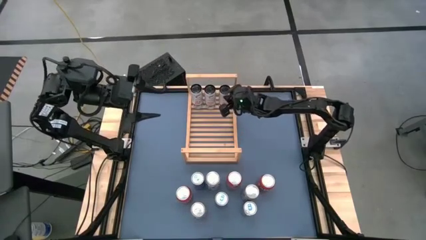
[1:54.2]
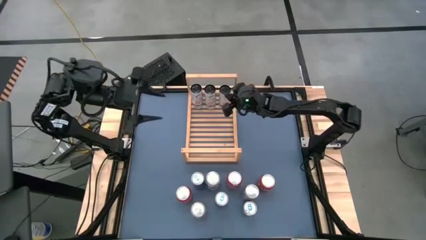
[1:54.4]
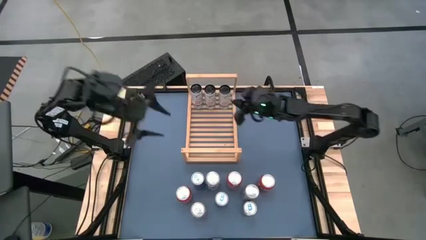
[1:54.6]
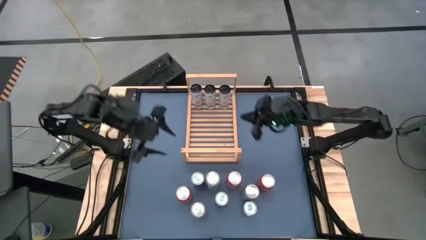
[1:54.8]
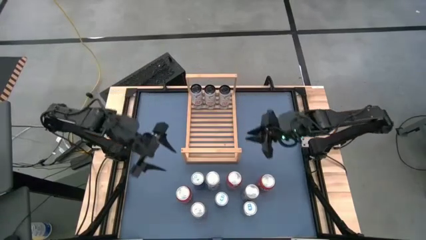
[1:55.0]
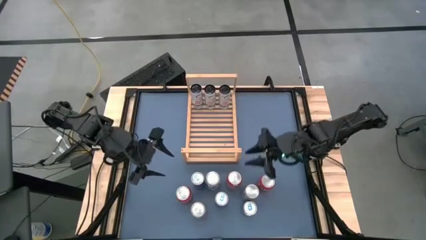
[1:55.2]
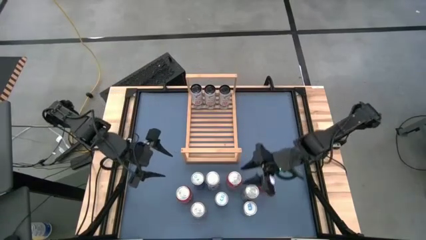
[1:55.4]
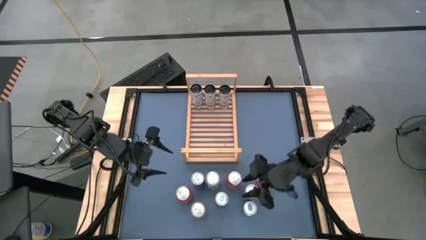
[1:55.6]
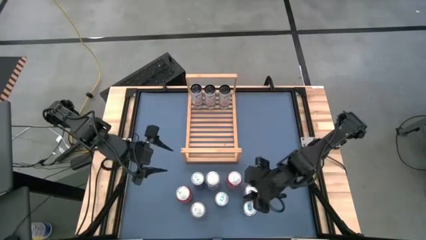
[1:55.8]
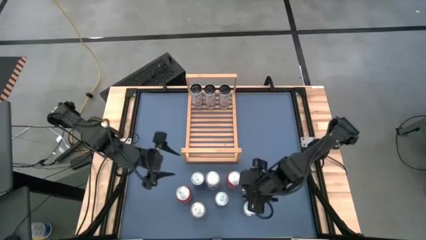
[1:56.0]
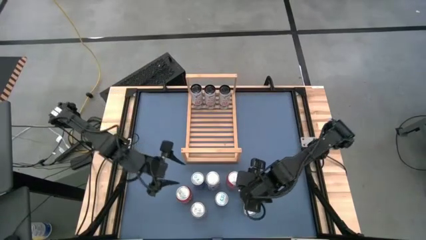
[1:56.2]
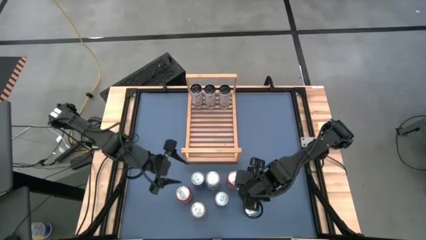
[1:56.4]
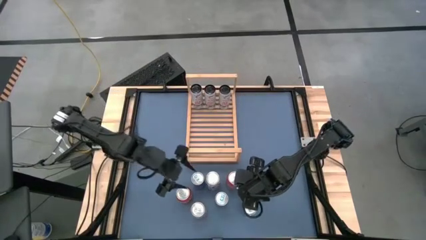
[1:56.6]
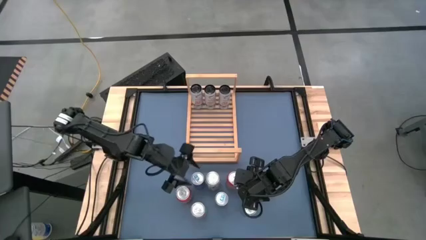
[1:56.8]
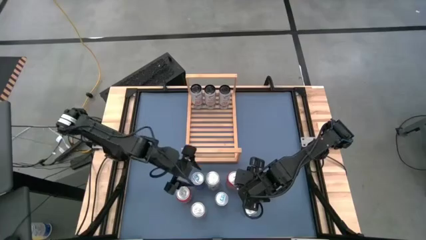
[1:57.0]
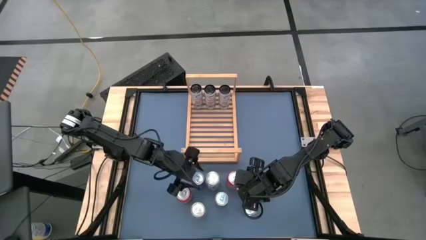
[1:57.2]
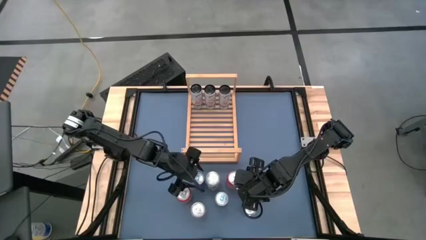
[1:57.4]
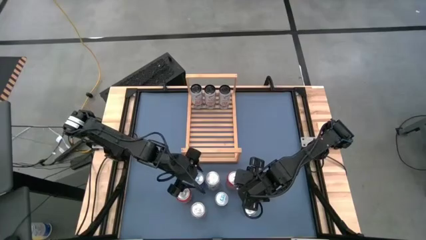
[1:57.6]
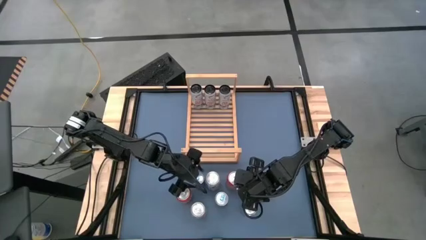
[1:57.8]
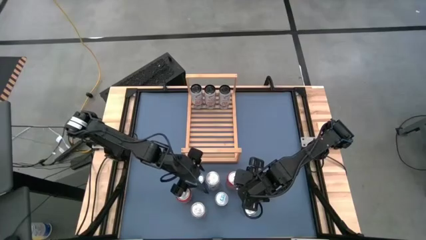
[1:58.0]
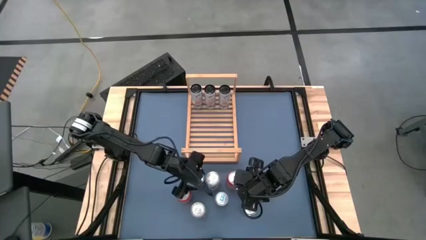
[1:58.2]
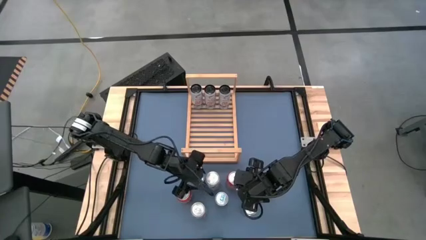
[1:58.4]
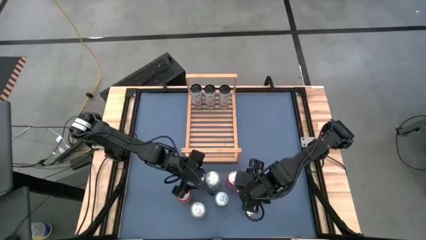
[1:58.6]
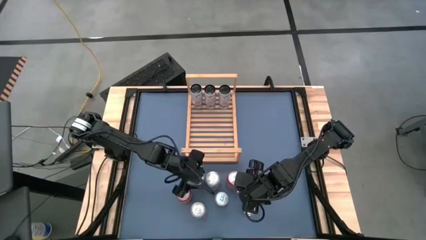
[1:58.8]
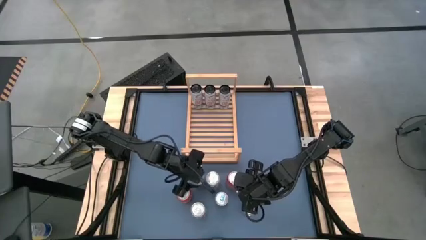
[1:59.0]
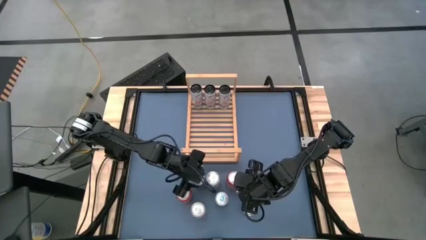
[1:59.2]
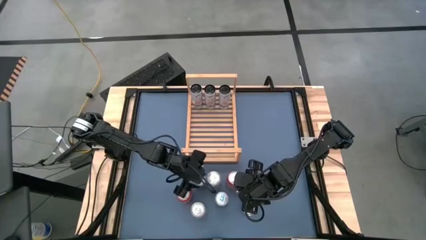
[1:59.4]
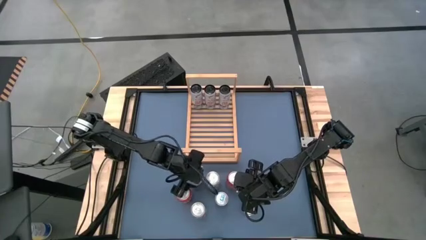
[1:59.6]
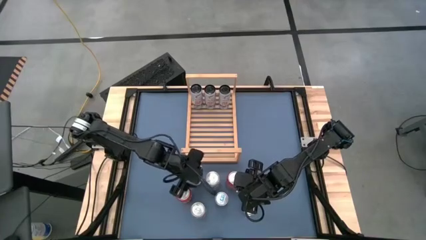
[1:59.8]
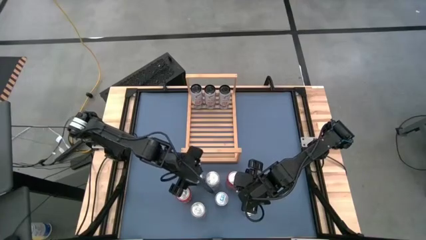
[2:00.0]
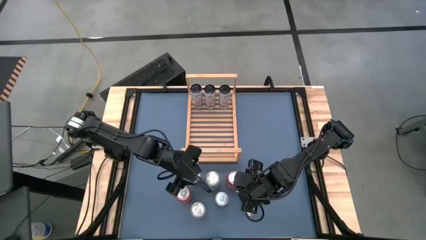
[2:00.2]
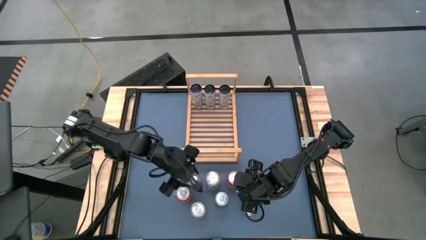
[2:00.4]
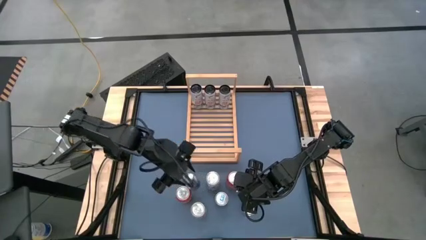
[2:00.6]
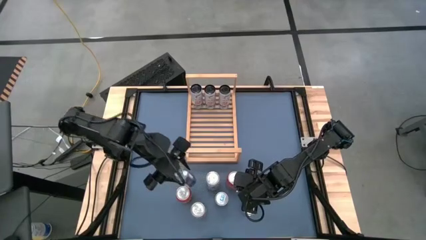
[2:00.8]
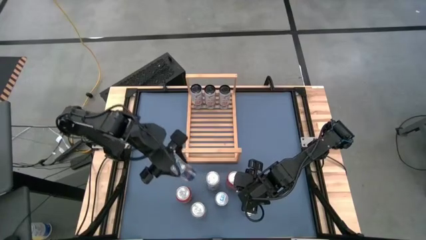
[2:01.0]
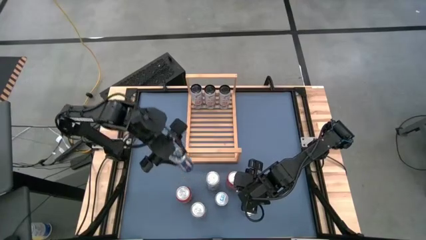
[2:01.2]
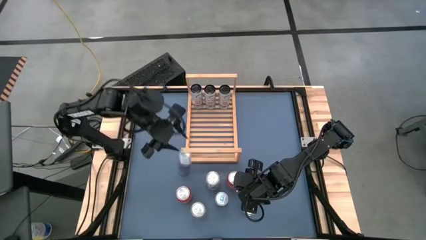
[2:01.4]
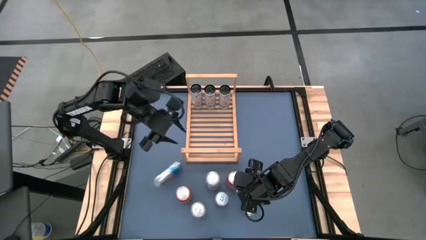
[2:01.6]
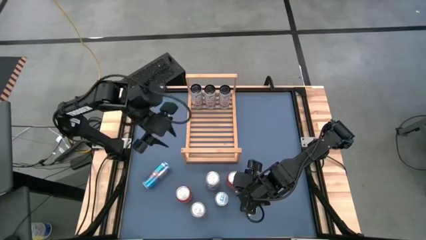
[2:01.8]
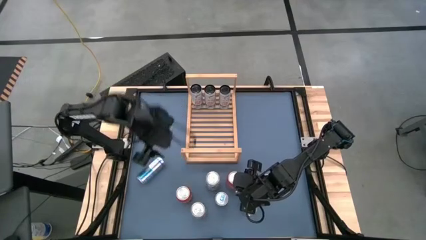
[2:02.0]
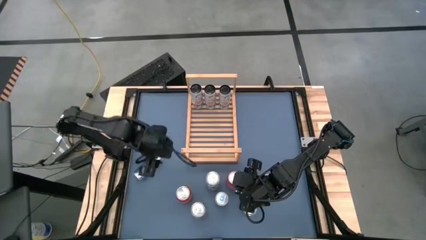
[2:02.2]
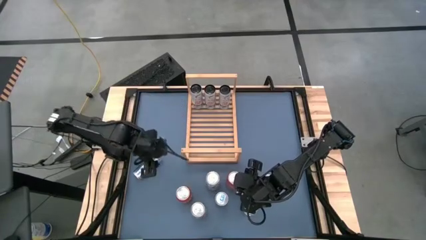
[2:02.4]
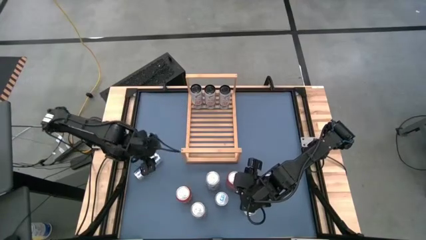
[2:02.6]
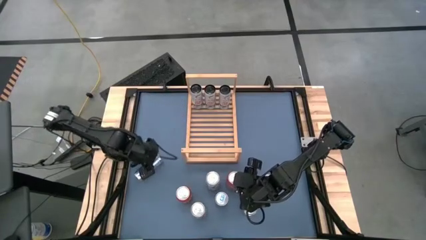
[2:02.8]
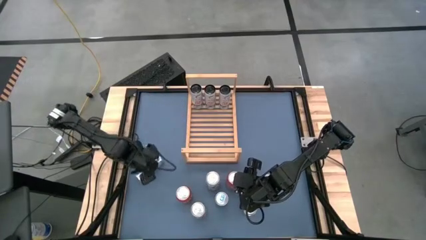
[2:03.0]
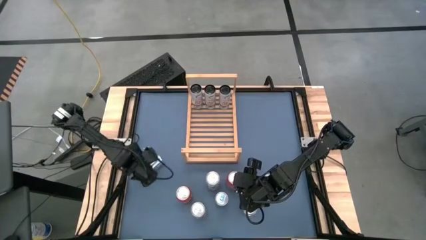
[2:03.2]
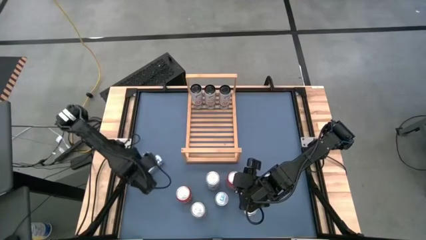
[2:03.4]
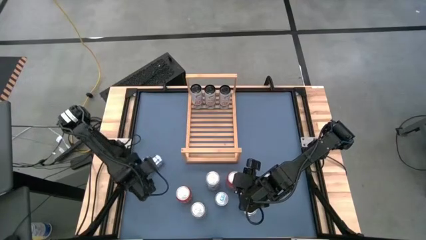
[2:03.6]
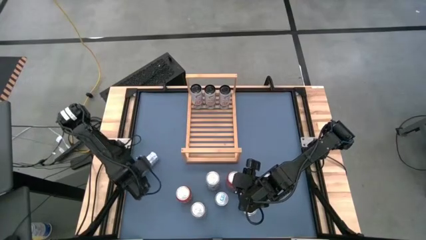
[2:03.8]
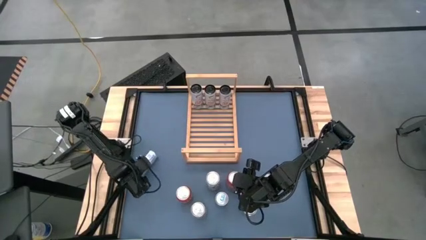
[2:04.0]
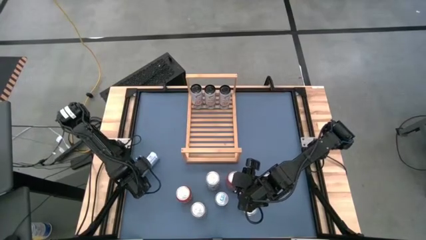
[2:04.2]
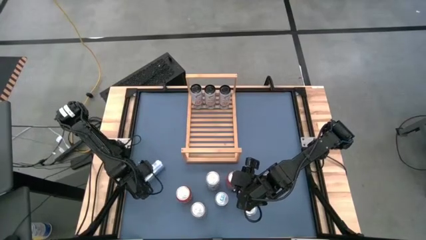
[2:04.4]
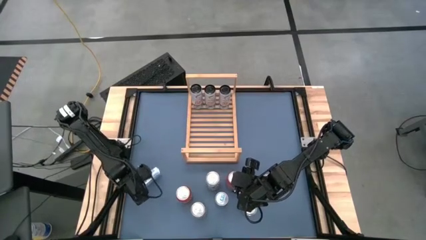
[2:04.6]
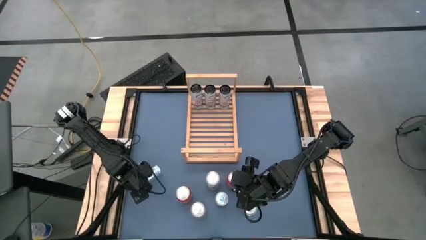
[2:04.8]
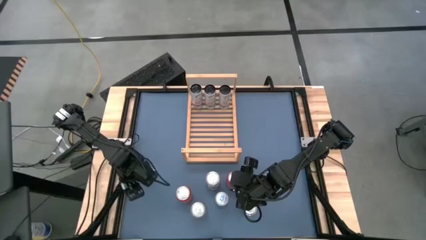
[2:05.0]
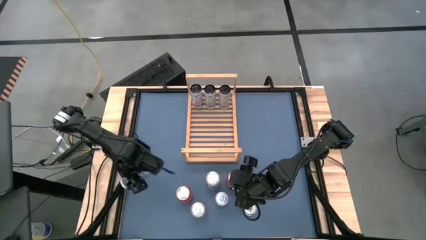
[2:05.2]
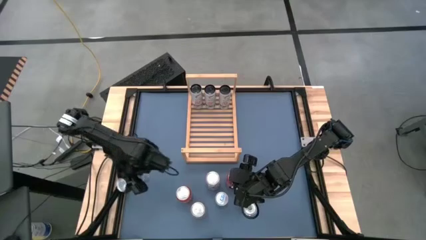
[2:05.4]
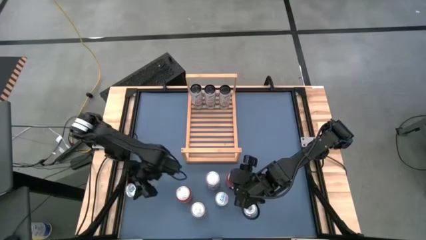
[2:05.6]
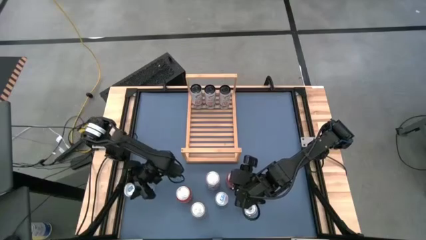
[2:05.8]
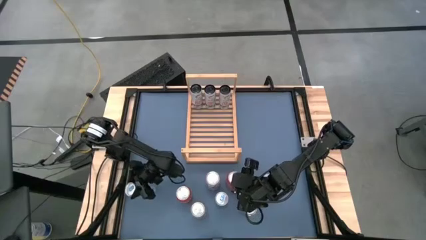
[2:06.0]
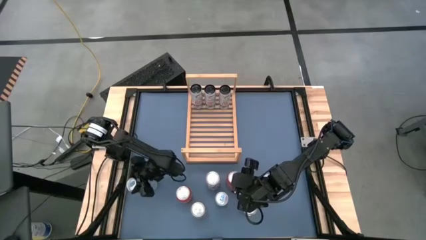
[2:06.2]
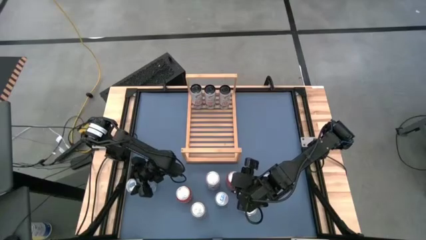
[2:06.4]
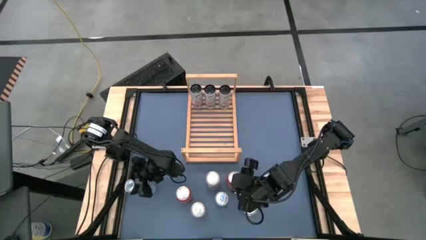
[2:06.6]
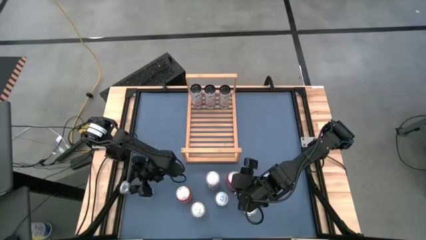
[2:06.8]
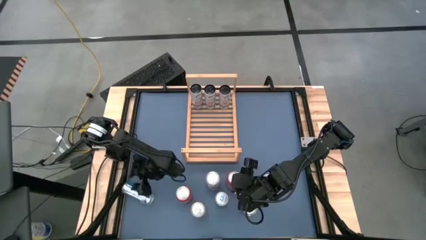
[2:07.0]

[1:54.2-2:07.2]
Task: Place canned beverage on shelf
Put the top blue soda can on the shelf

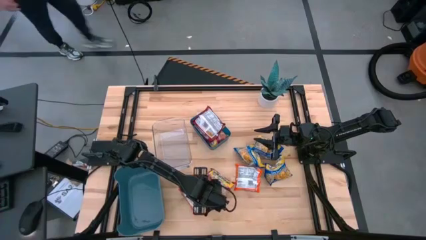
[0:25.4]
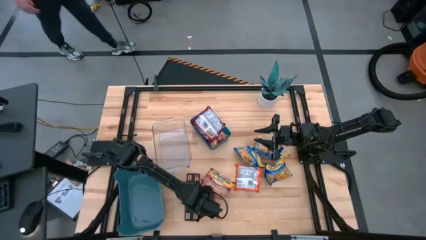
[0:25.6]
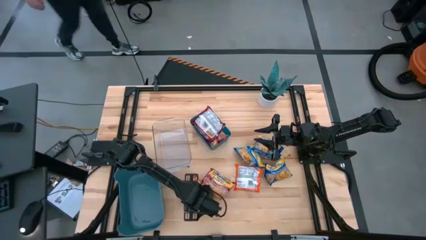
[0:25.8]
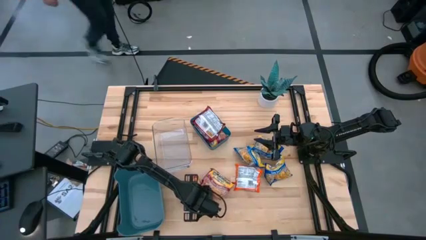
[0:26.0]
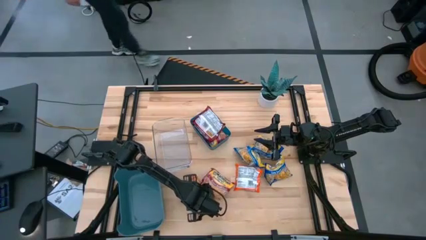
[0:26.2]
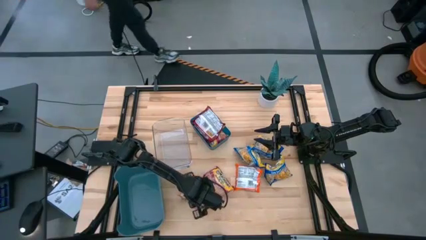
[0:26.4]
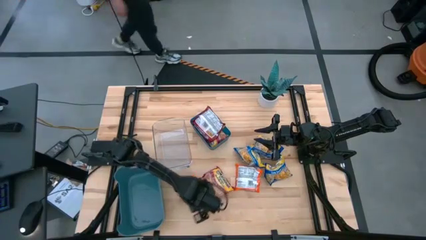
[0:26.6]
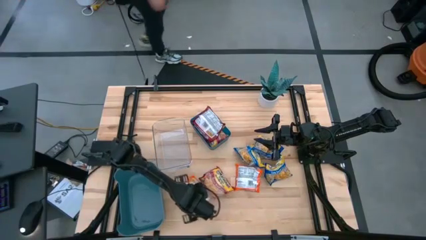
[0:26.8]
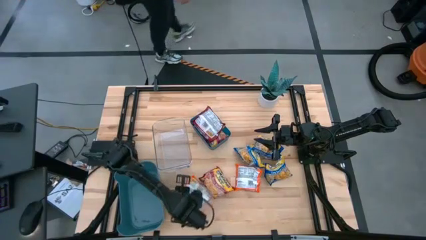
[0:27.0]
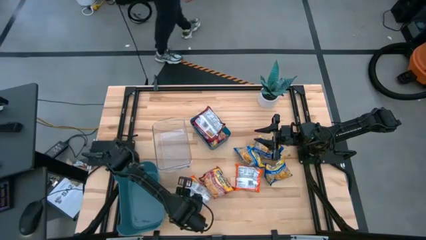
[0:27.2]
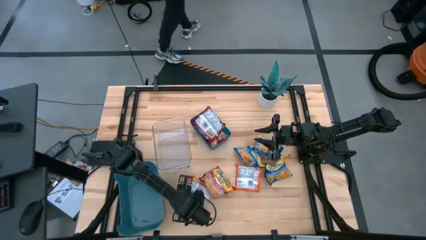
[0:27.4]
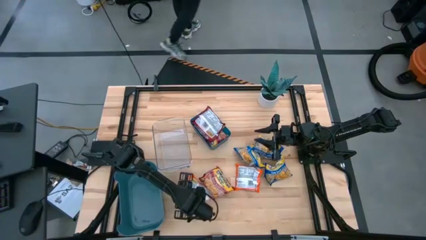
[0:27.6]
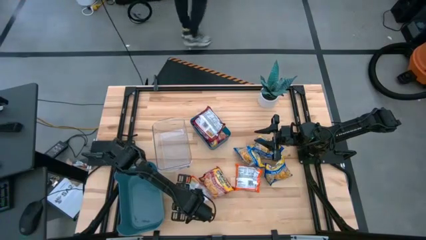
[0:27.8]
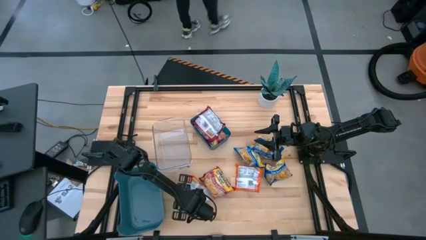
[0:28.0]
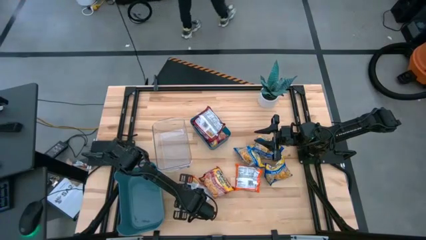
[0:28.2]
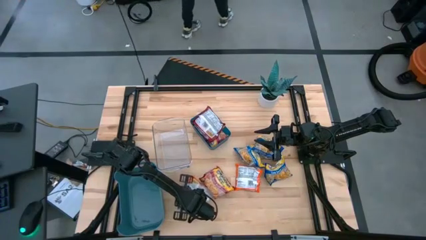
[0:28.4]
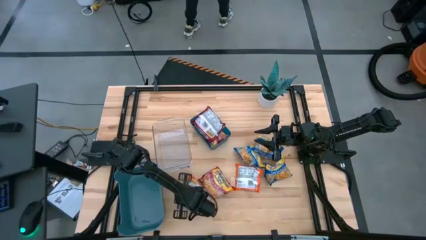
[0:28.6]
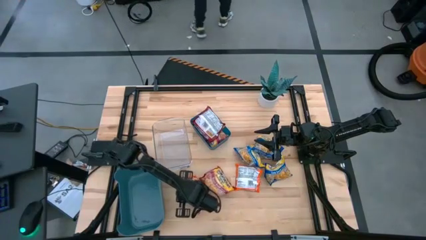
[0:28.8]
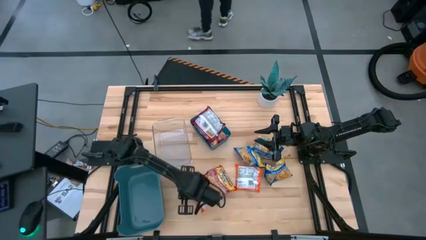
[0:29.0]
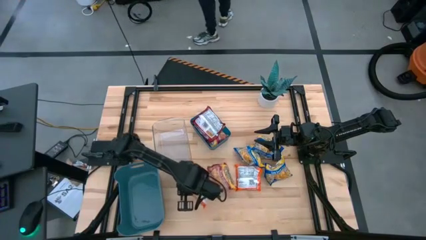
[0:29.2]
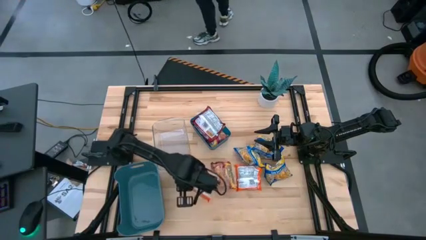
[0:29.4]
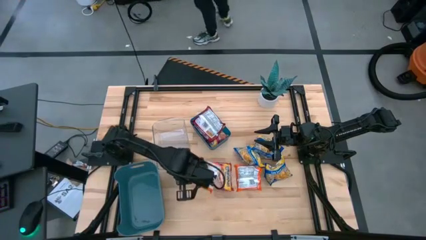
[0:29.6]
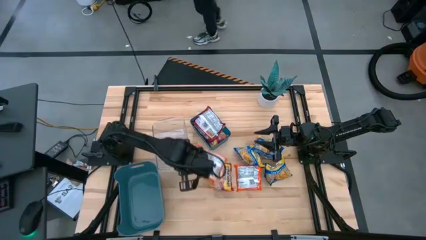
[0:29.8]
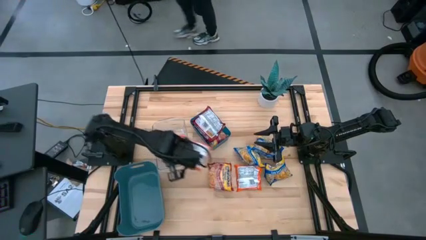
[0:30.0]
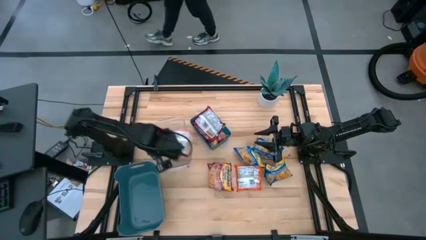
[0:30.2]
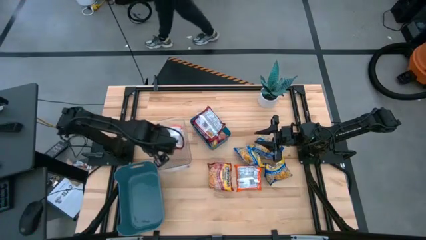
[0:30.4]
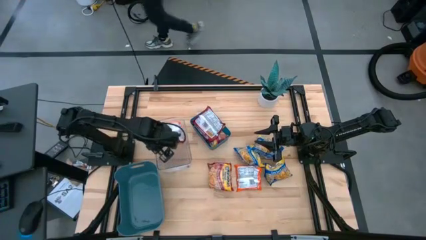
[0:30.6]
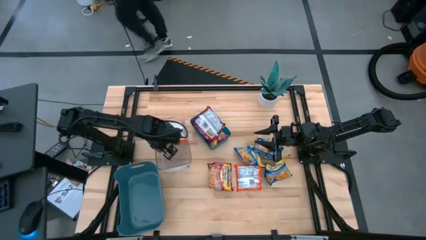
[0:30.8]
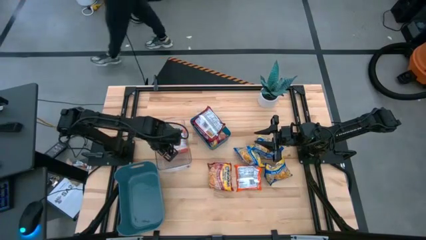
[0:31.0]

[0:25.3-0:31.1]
Task: Sort Maruchan noodles
Put the orange noodle pack into the transparent bin
